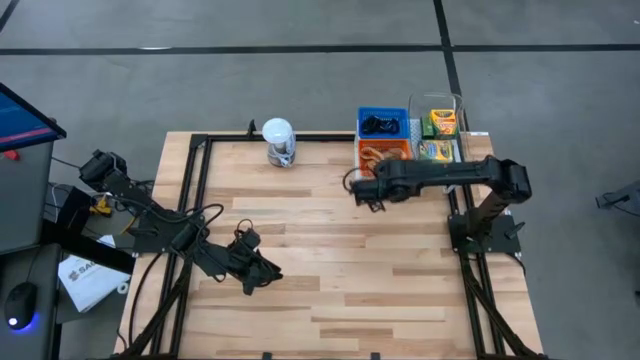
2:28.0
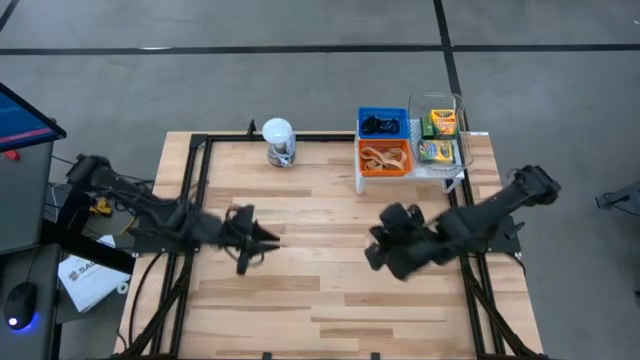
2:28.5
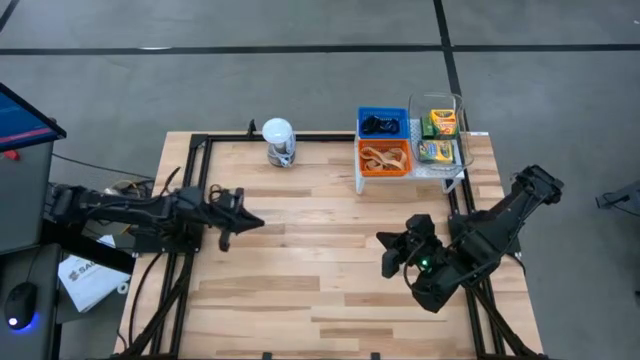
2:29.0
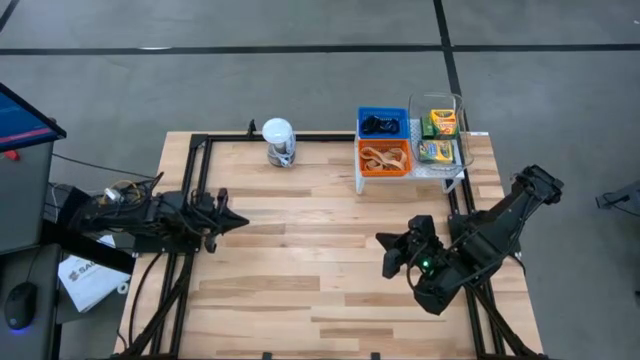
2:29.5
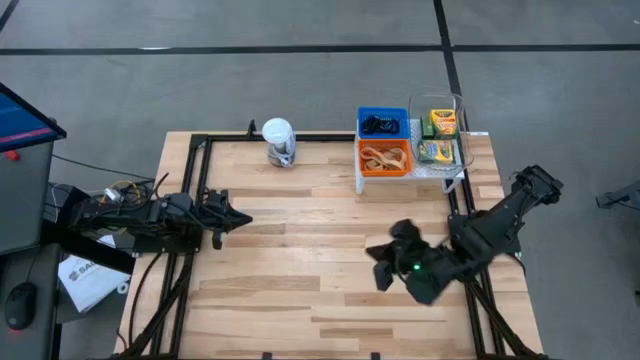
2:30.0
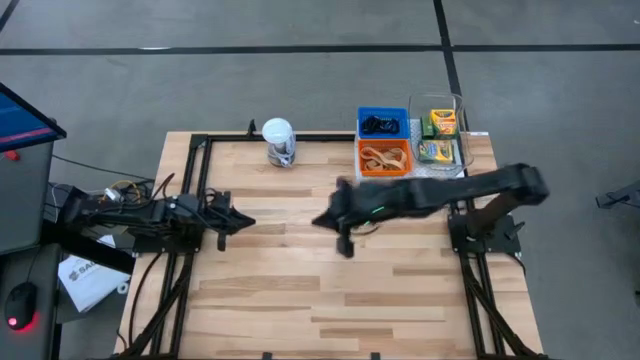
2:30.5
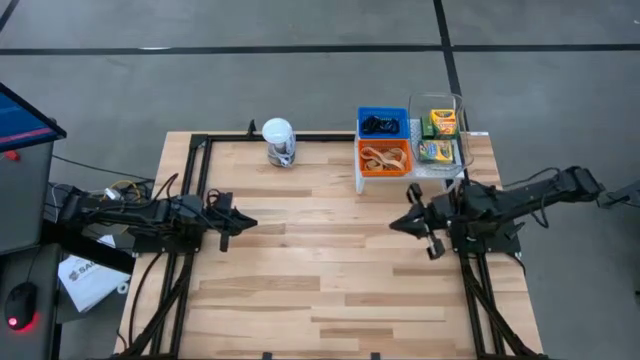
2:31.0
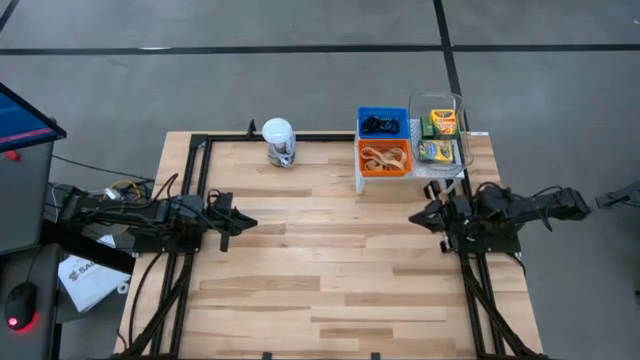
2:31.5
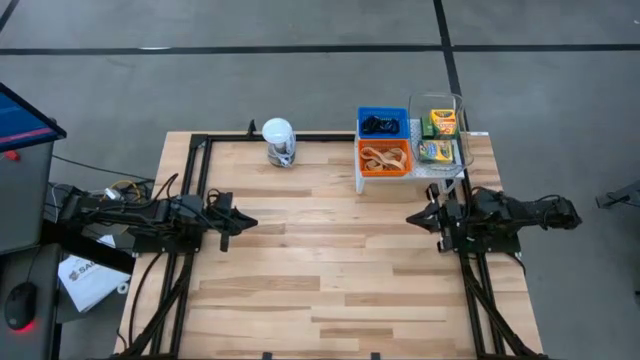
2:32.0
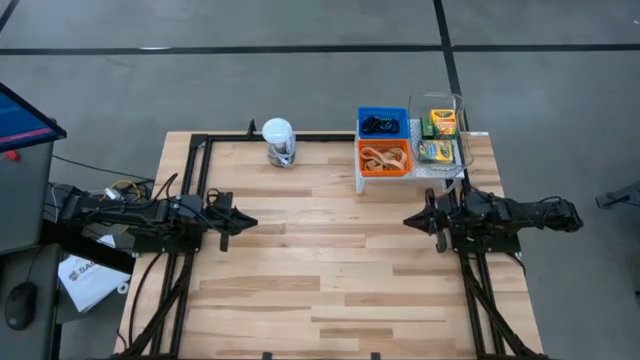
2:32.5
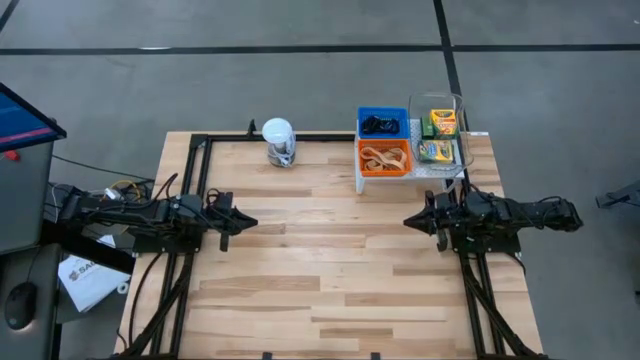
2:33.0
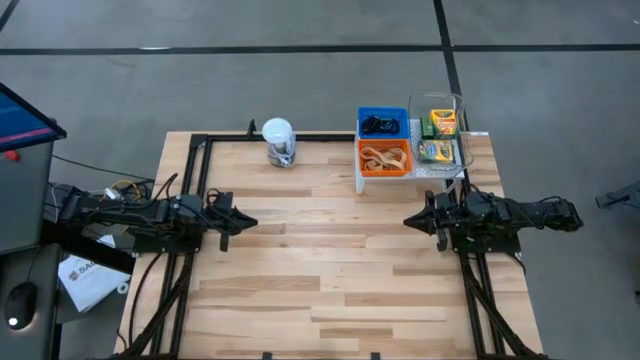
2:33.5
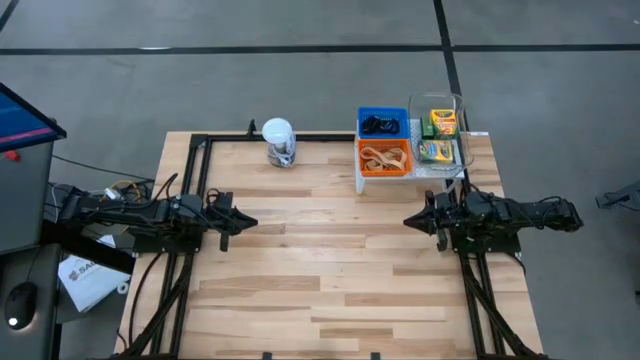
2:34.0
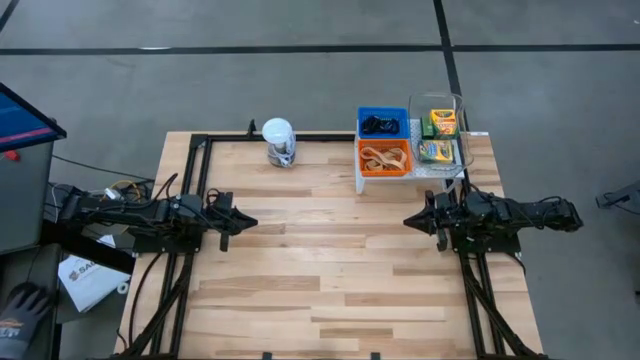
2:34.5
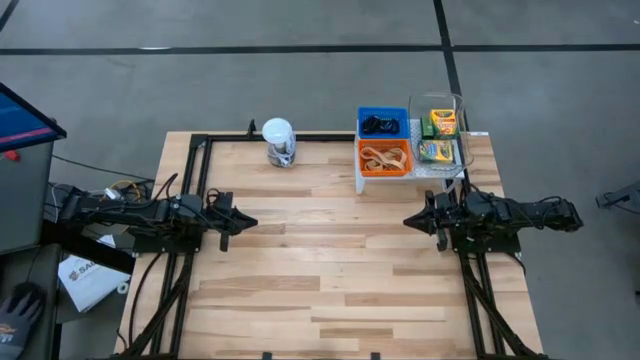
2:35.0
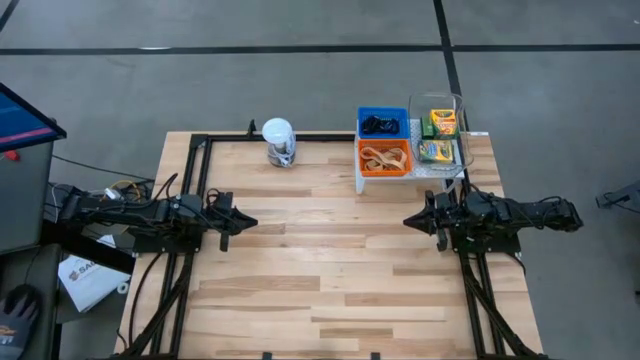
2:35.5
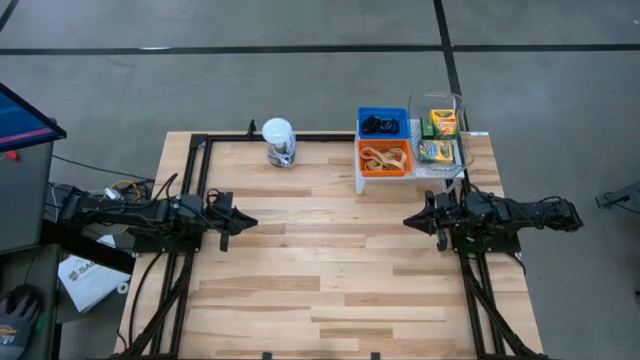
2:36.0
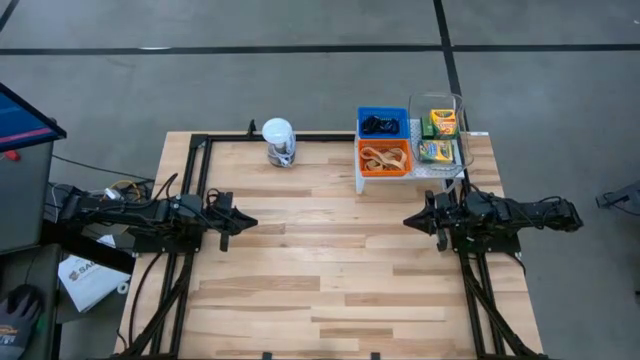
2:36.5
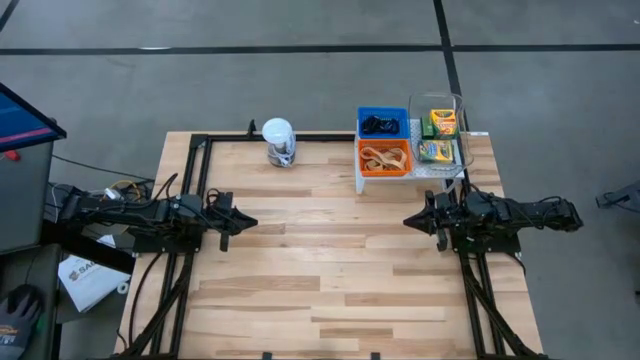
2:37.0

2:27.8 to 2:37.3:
Task: Pick & Place Office Desk Supplies
Return to Home Position

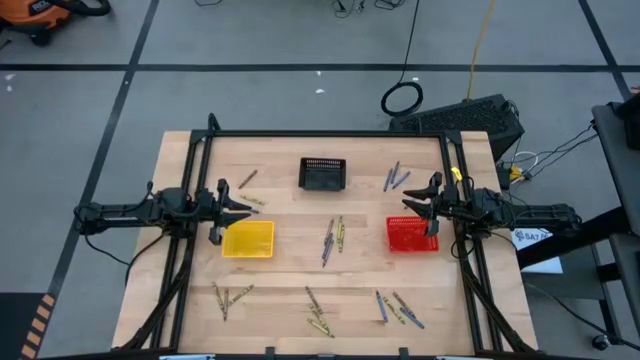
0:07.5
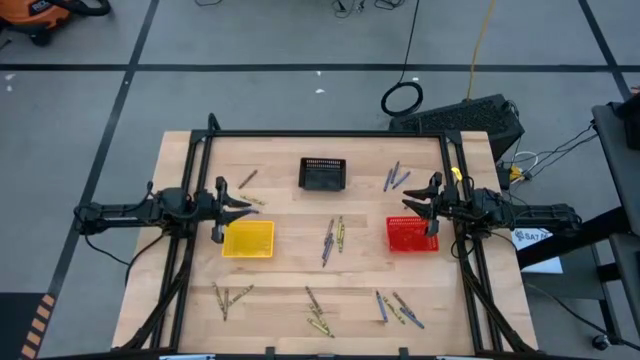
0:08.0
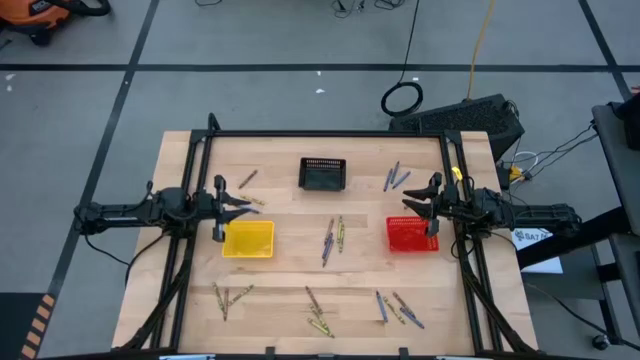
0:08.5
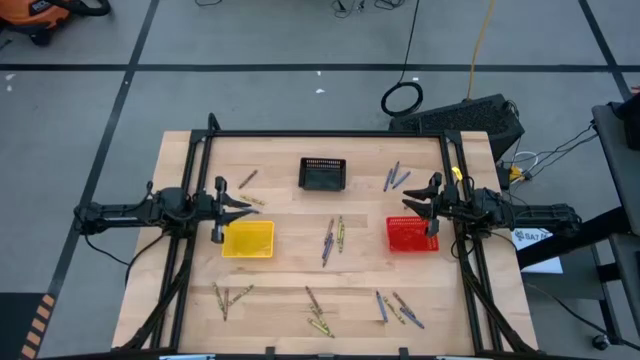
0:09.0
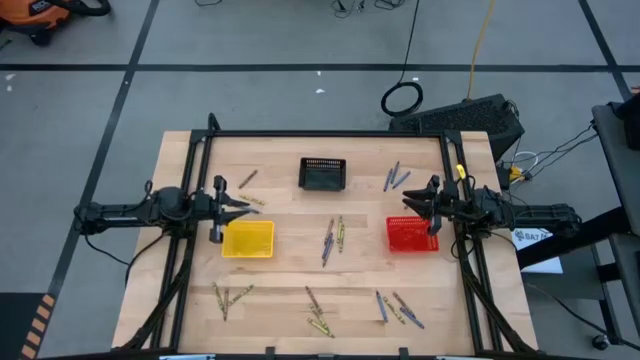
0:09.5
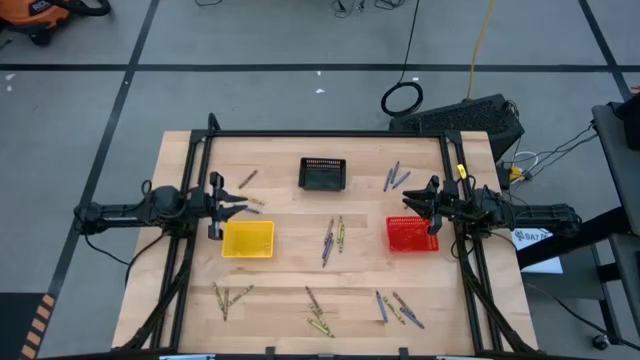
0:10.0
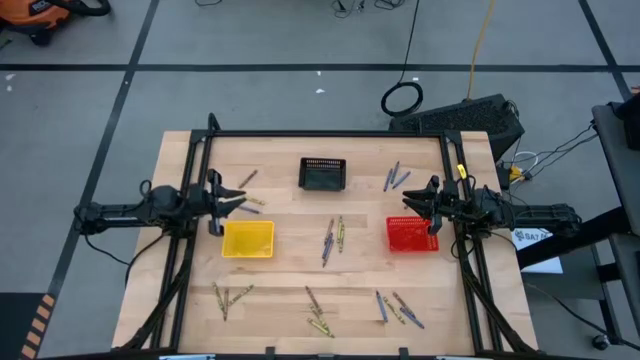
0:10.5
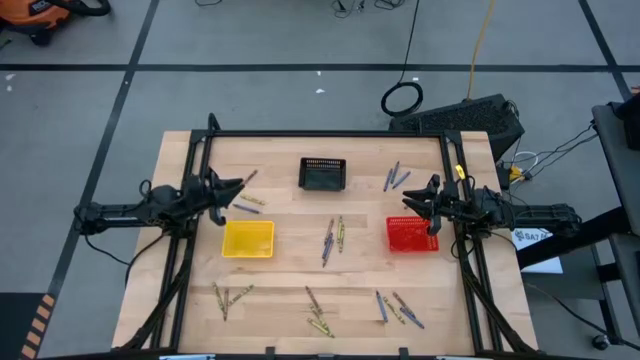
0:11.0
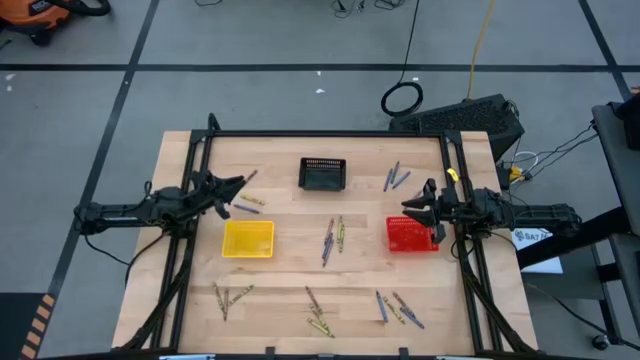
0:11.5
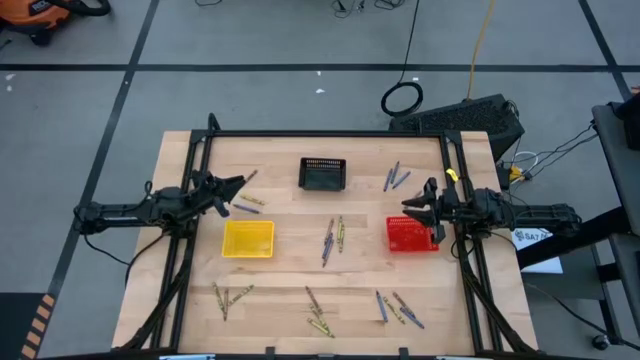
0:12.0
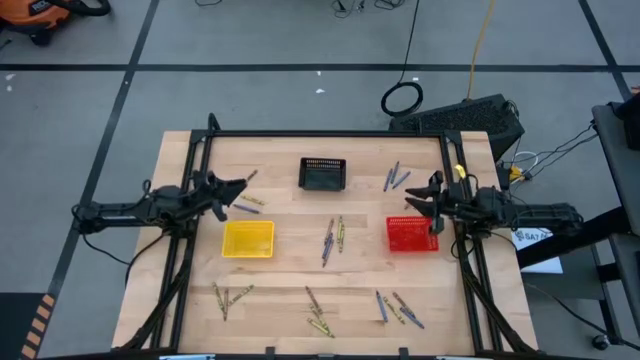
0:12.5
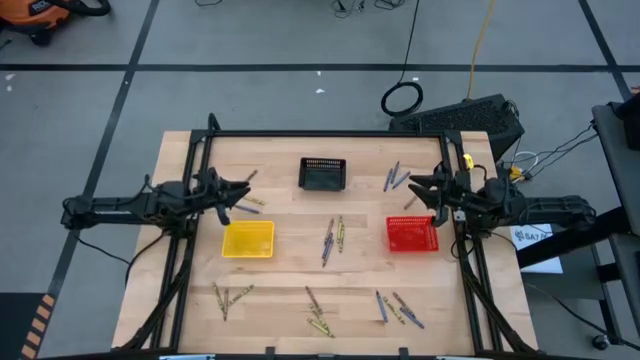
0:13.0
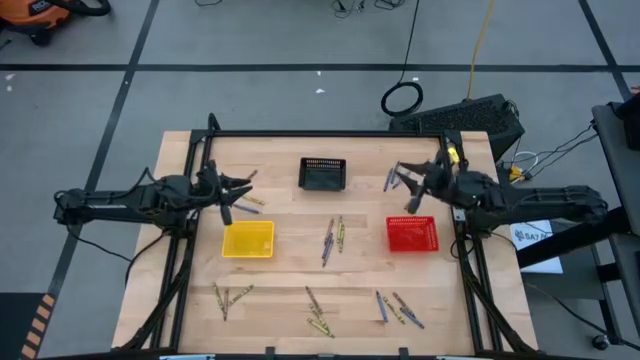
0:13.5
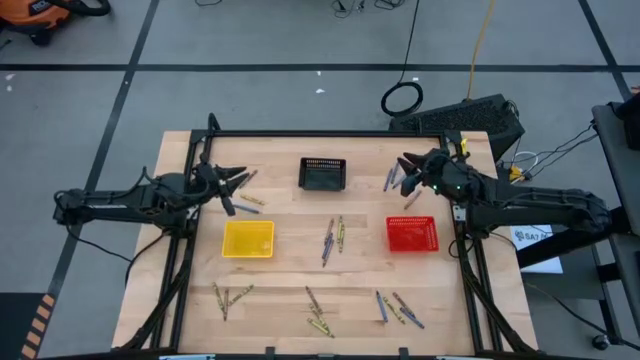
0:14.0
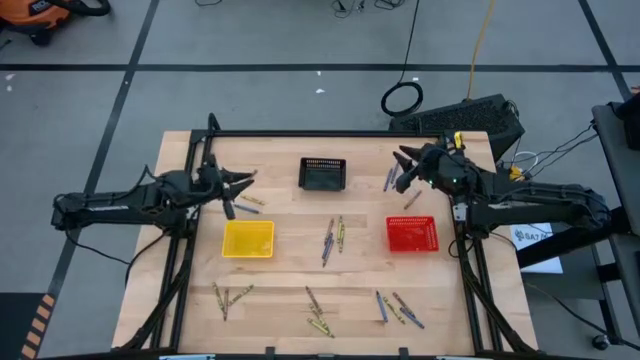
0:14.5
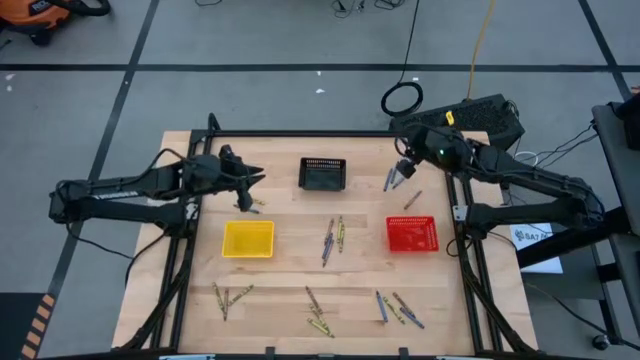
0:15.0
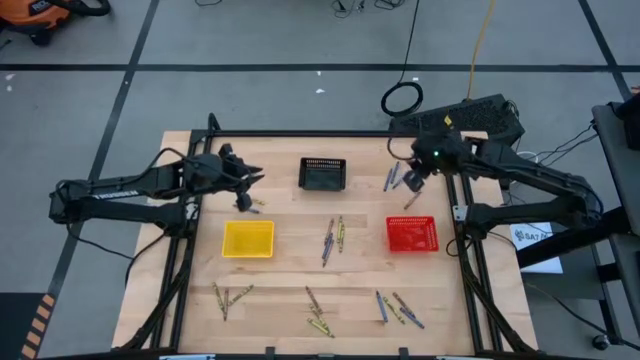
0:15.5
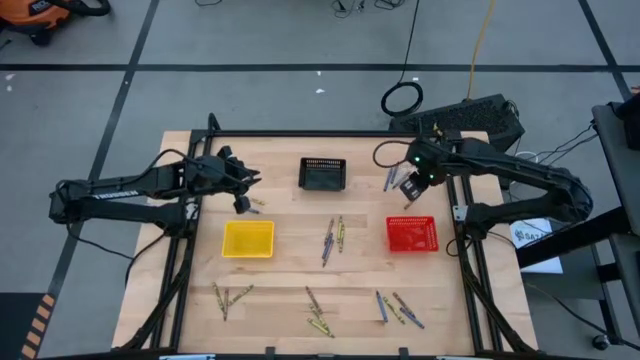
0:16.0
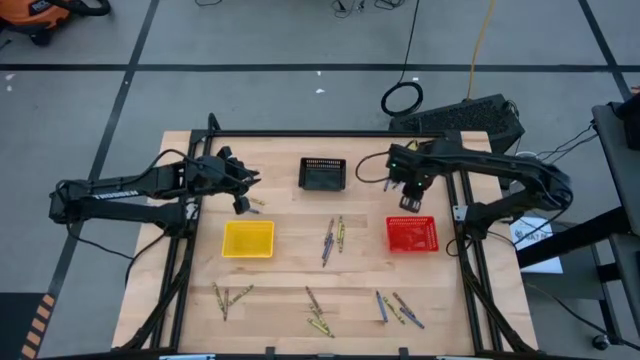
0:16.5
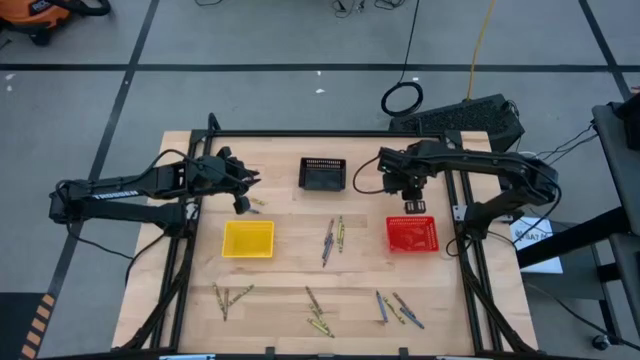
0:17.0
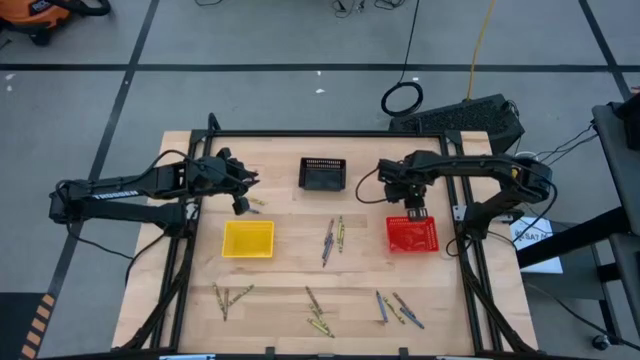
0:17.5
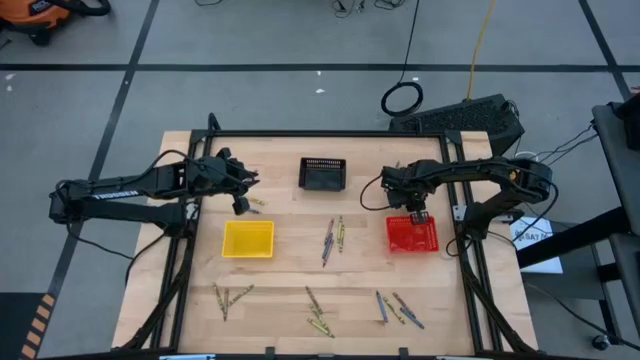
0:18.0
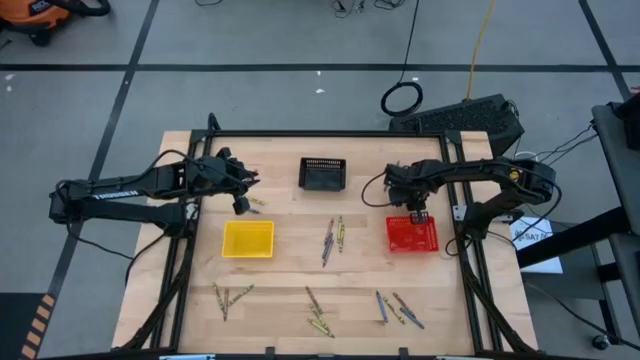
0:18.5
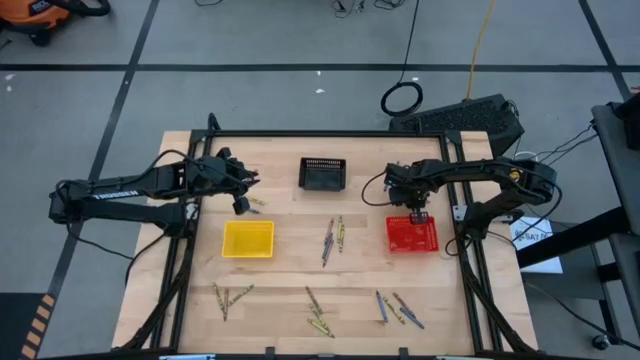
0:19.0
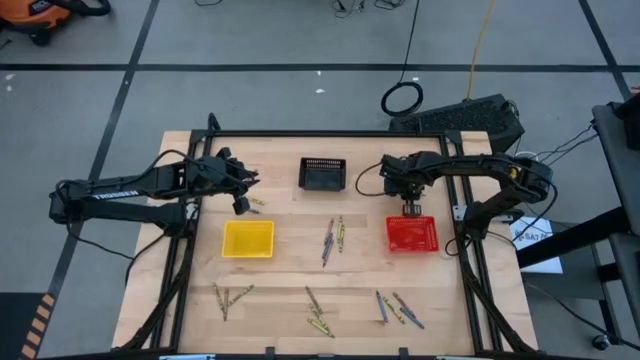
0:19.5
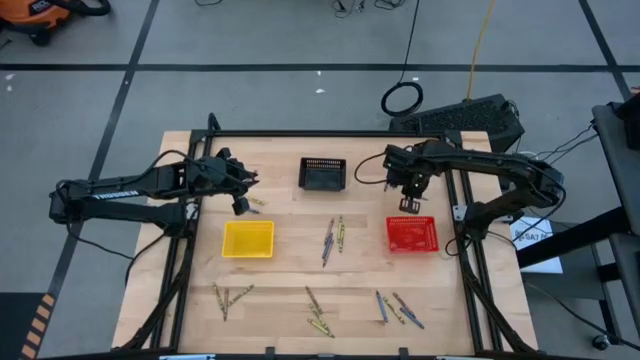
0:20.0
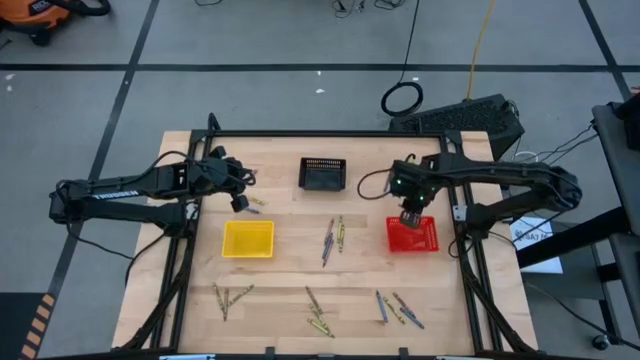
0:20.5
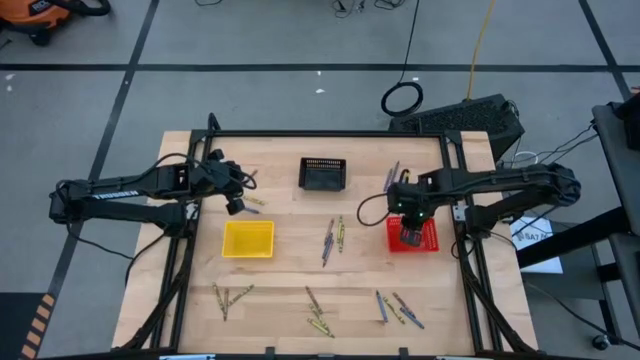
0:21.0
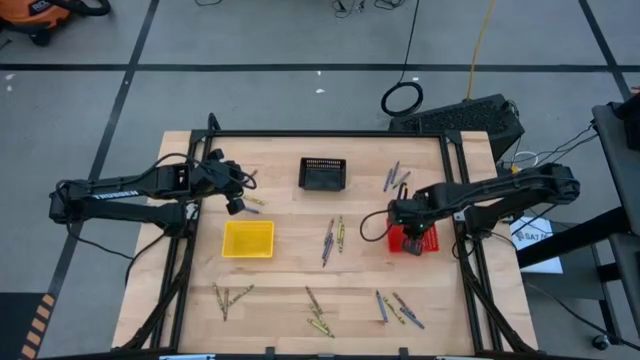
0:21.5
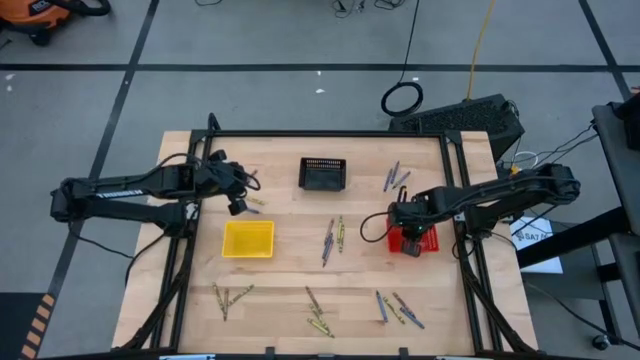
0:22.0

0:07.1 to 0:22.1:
Task: Sort crayons
Put the brown crayon into the red bin
